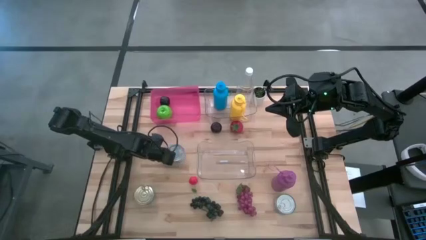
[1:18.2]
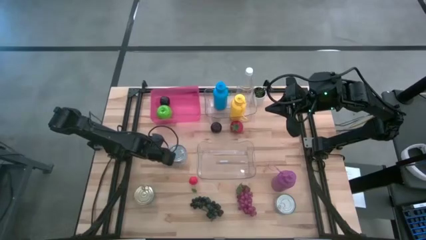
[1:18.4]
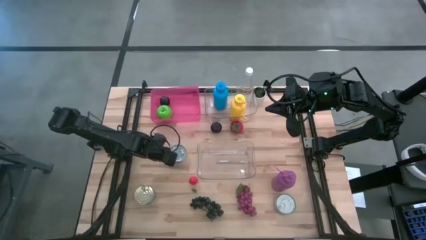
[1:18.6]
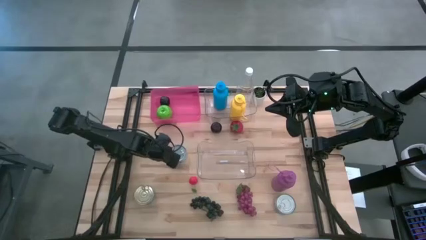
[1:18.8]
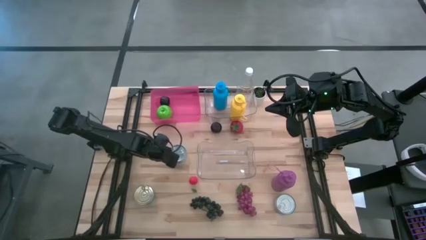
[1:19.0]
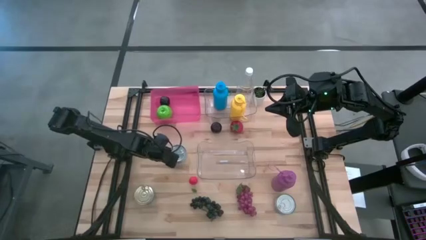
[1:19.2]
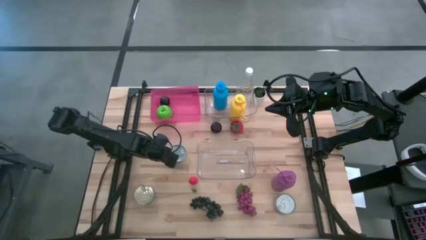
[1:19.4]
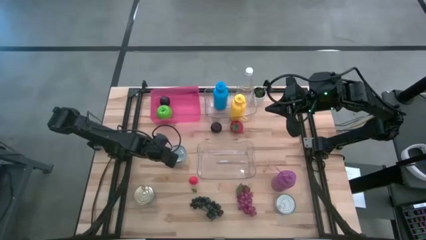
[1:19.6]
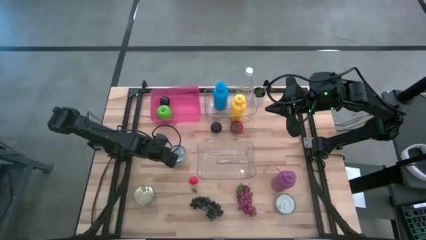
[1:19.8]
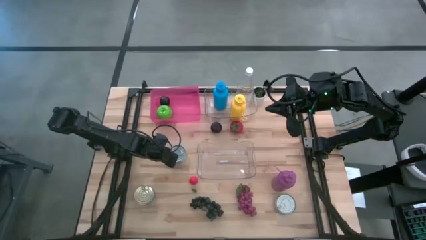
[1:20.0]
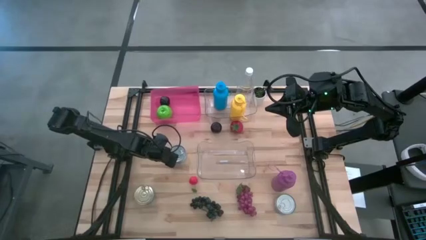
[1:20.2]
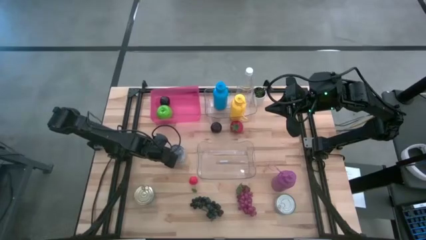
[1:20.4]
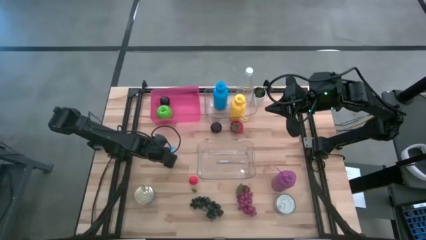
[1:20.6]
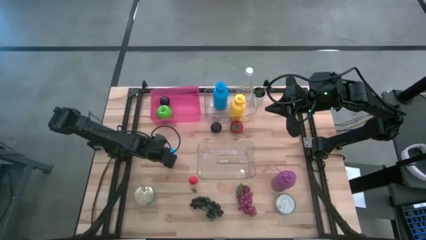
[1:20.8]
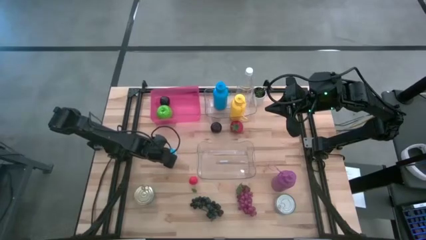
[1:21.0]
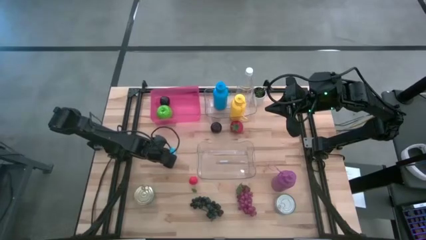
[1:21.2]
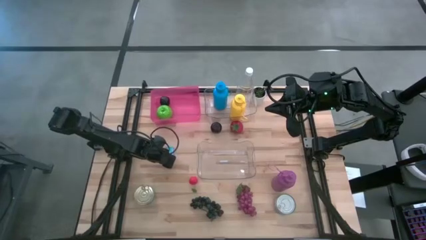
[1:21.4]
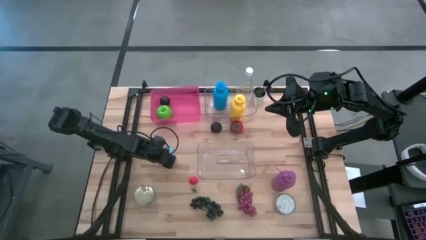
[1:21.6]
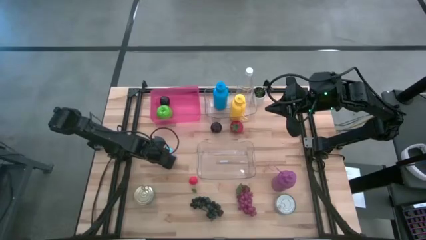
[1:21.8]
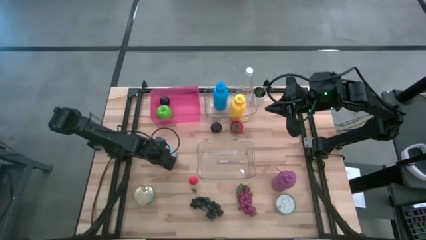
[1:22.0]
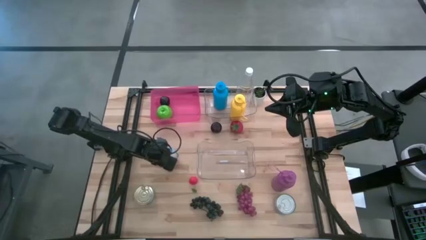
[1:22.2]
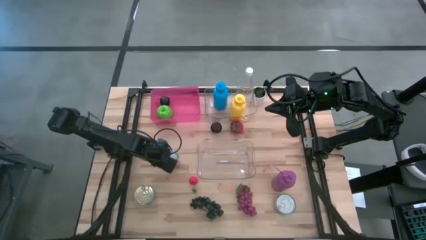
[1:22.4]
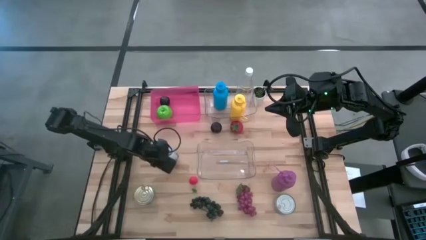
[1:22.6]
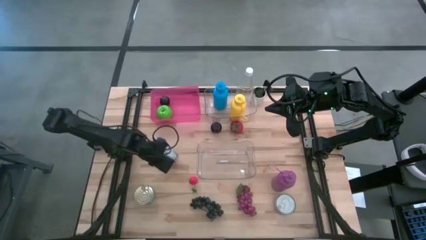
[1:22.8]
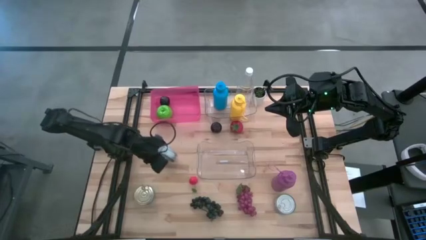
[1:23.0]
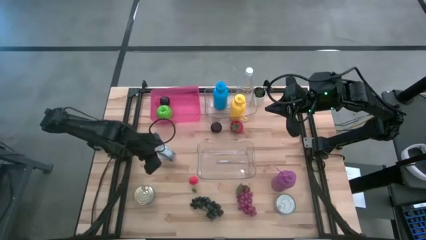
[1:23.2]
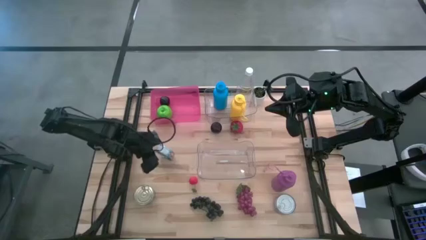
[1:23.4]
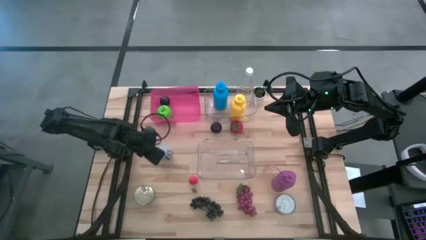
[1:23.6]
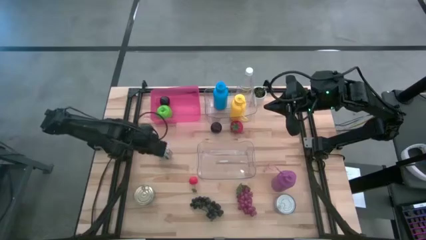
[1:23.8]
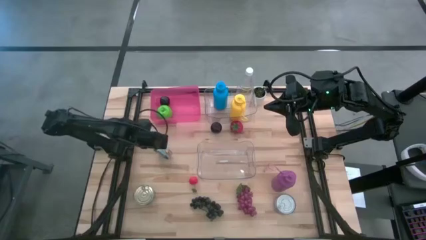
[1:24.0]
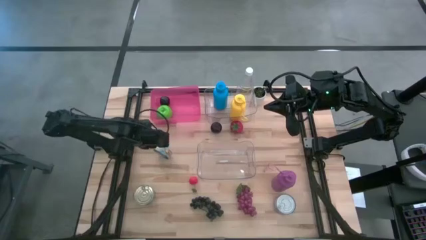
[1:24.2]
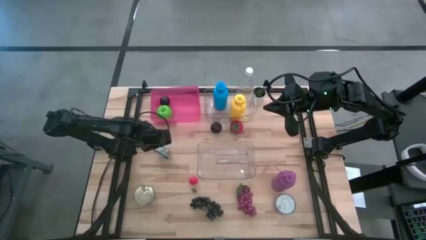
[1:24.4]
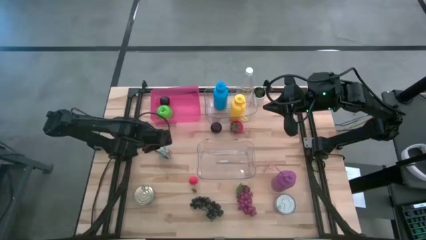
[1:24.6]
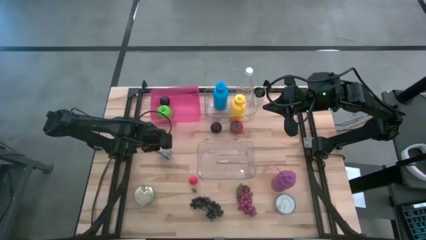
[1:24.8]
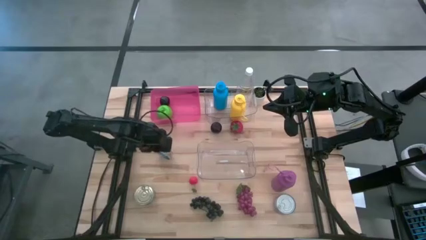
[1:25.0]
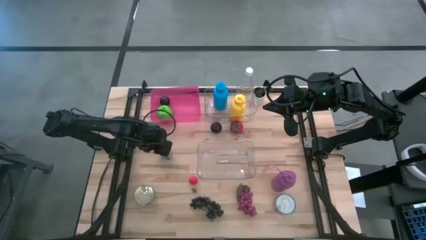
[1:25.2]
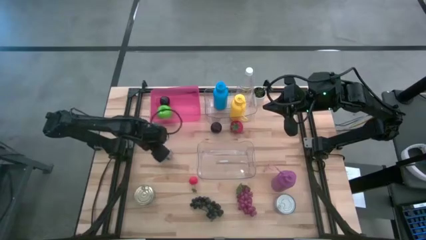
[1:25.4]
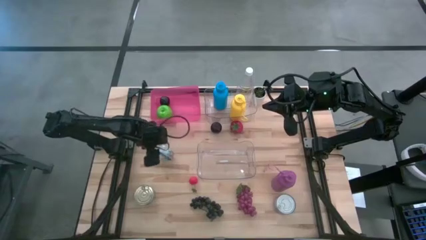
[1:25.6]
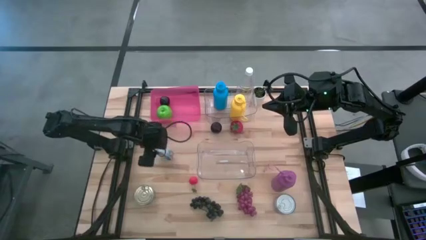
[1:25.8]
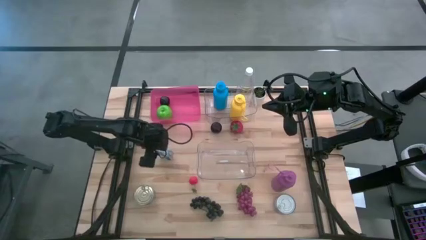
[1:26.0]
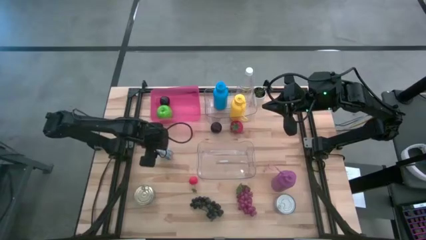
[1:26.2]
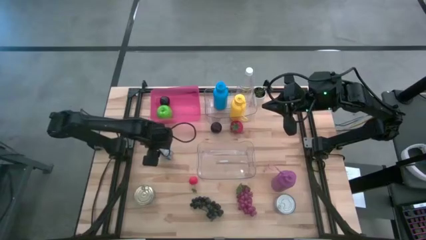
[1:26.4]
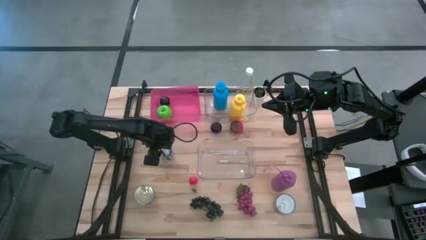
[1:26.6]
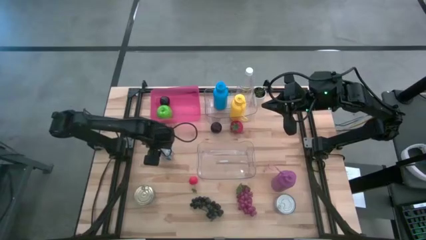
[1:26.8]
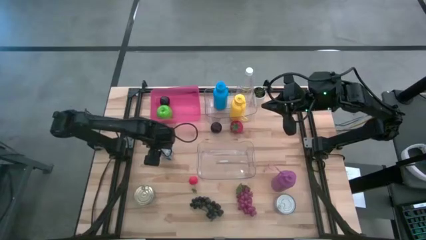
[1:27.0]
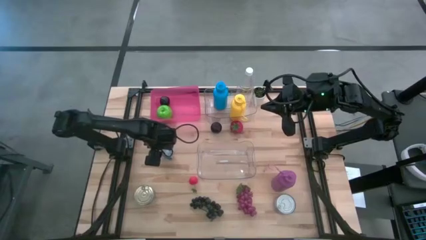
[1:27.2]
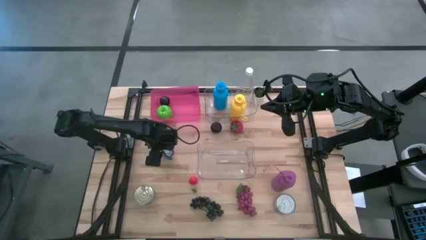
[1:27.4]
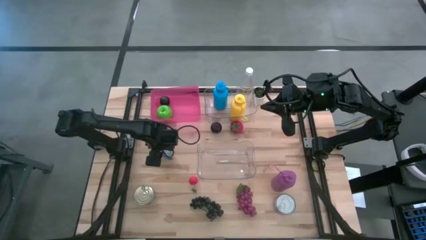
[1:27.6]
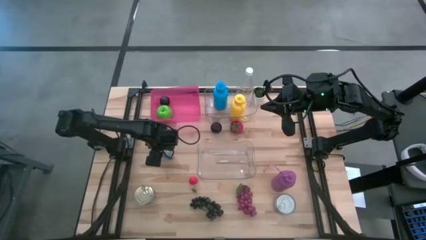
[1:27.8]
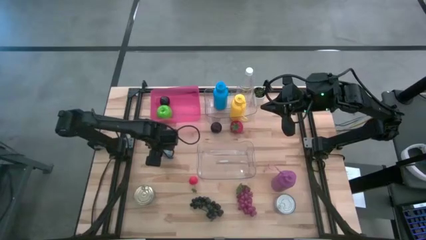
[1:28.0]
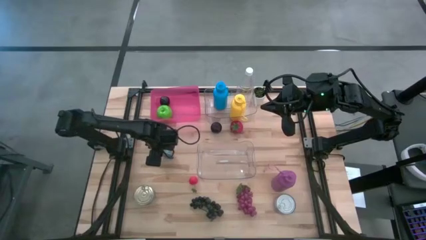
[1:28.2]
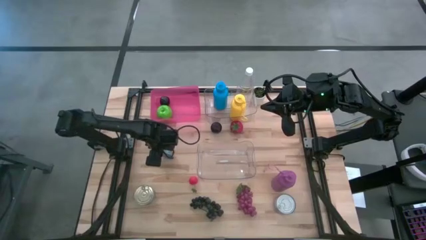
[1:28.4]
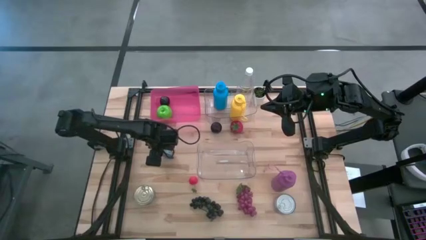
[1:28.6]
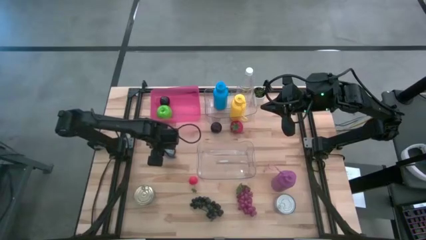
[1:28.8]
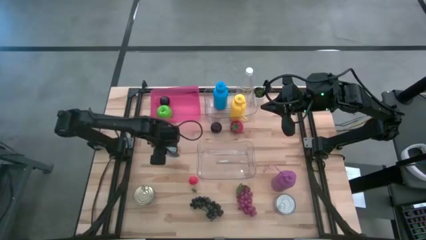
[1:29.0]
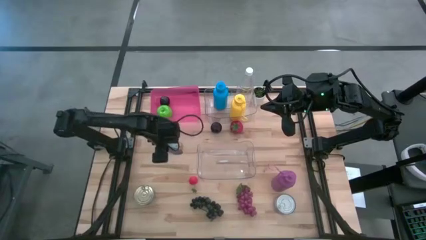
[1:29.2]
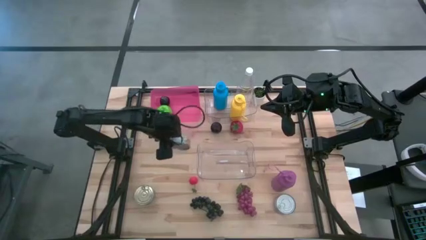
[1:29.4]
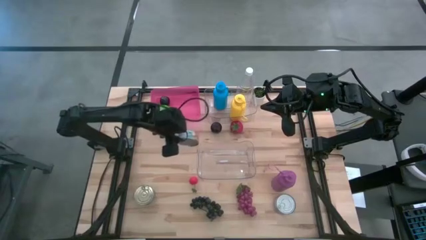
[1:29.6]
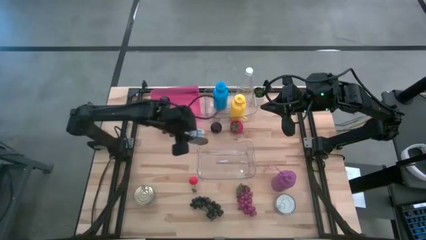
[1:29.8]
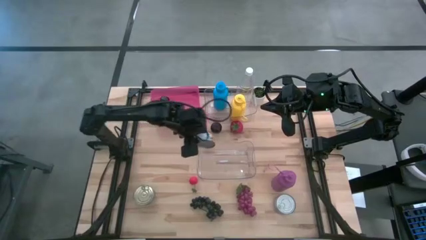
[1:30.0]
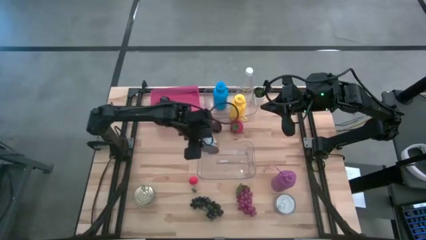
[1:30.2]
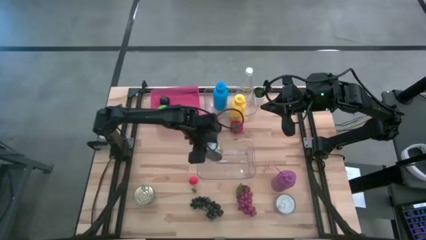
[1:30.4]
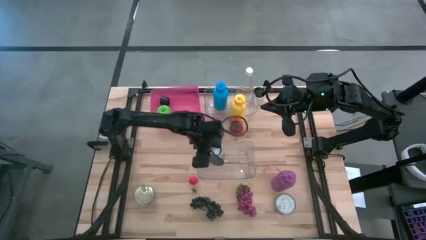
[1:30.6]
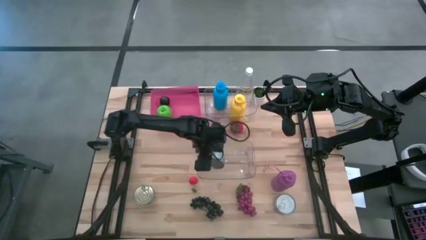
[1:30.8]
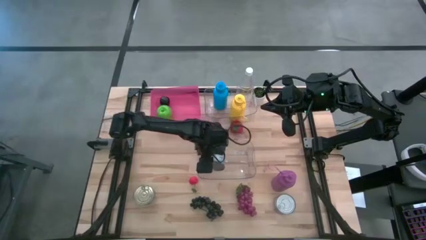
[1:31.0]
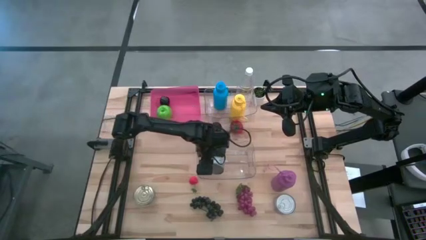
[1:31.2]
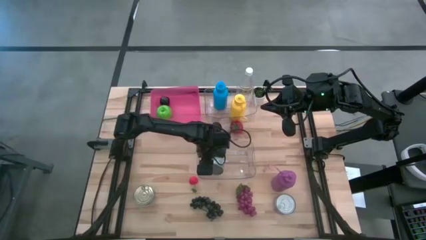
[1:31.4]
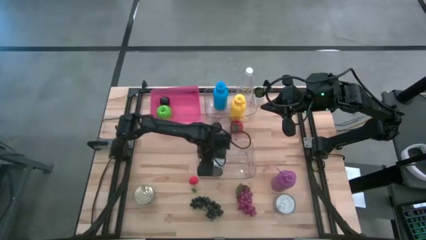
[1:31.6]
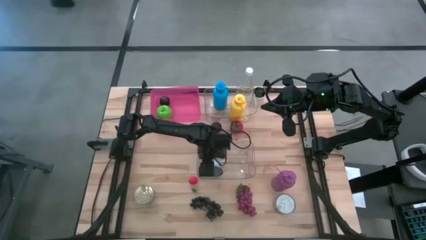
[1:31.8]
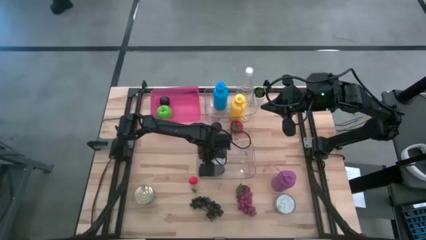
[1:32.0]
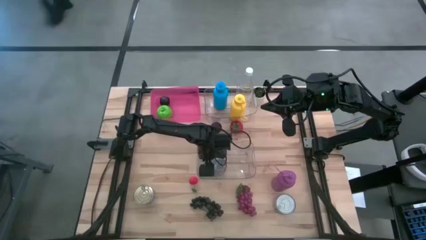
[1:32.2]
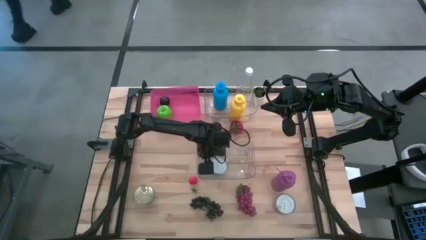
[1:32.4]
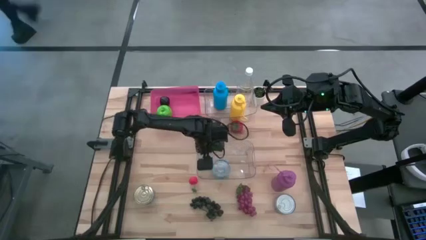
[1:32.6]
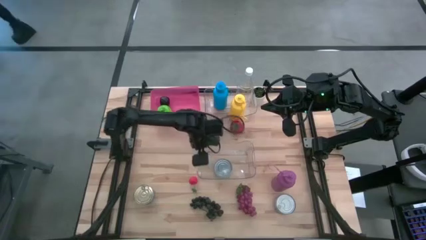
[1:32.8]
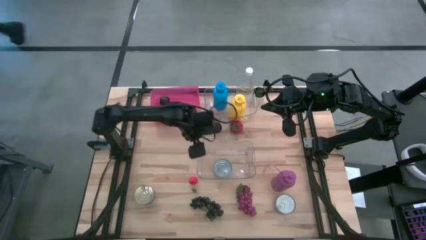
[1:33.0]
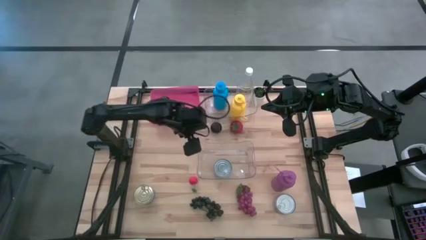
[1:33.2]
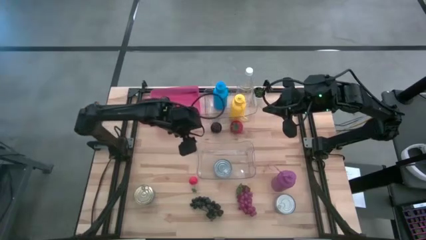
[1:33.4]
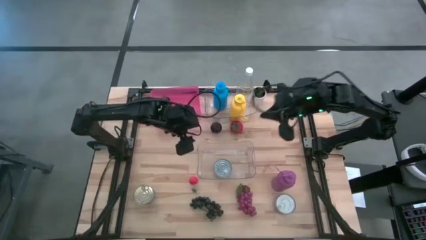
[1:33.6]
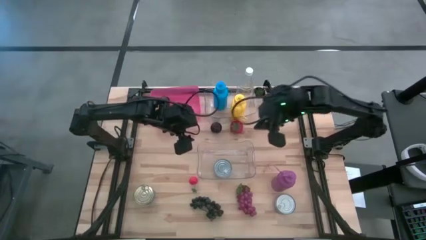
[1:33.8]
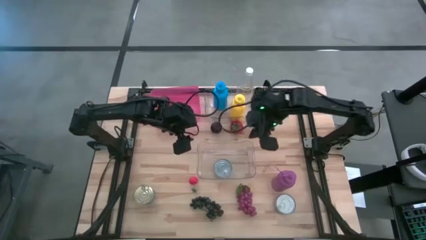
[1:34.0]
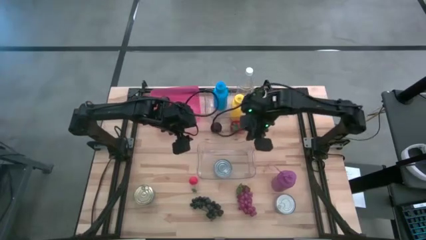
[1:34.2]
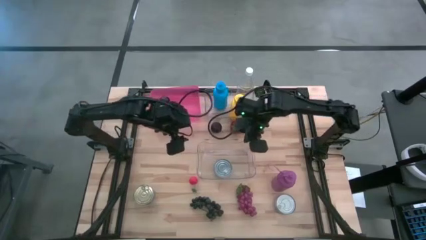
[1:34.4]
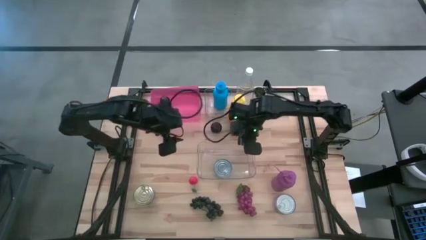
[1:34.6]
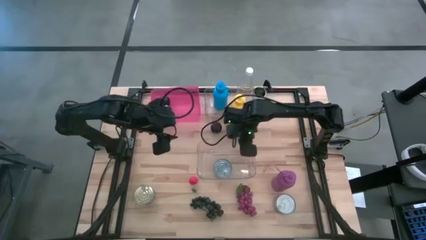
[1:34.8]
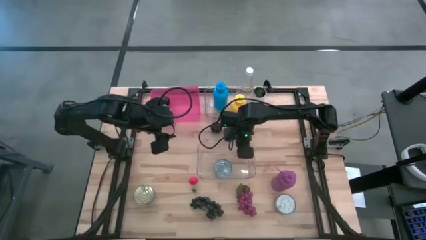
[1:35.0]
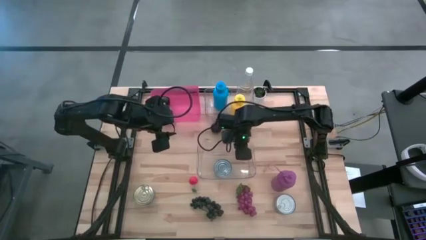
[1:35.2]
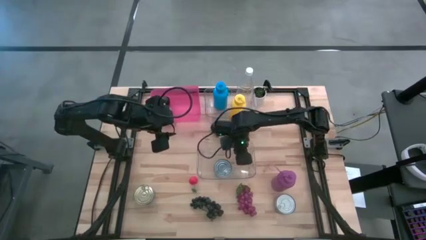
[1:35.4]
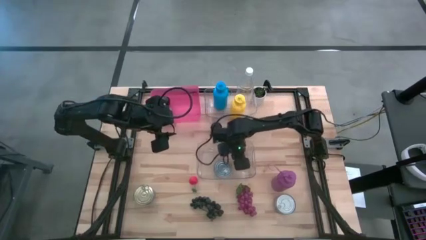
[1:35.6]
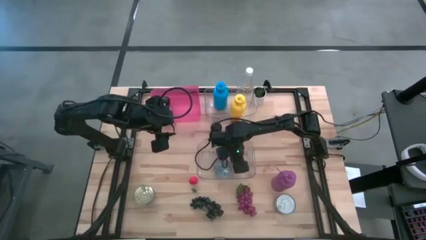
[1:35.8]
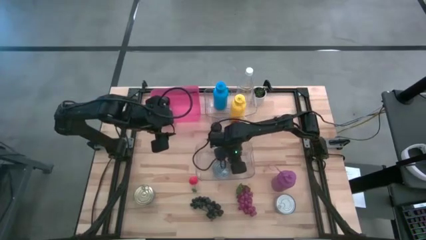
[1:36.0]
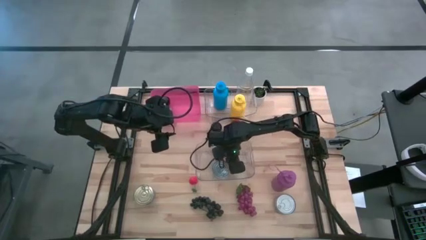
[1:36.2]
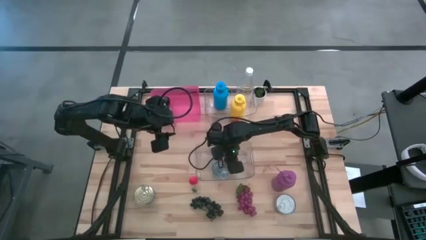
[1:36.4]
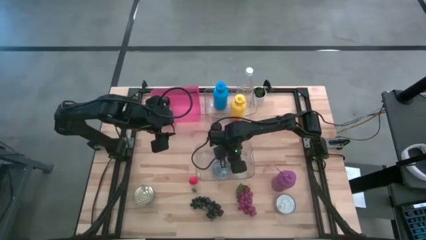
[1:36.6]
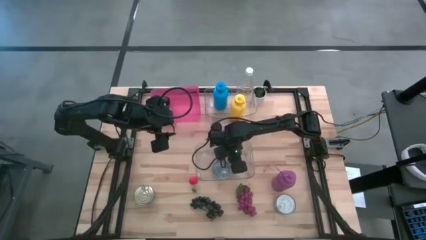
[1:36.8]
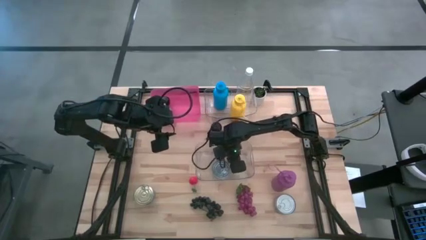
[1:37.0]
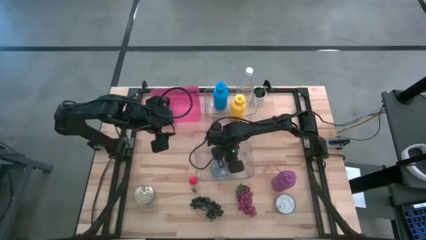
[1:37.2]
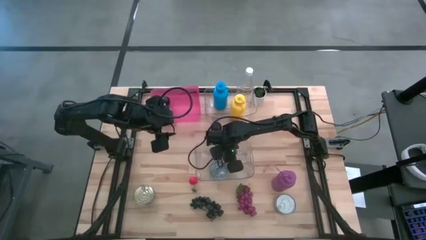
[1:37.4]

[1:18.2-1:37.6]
Task: Pick & Place Food Item
Put the yellow blue tuna can into the bottom transparent bin
